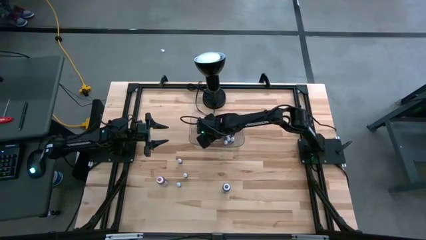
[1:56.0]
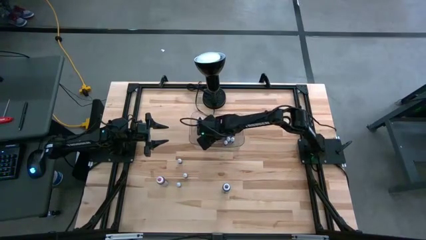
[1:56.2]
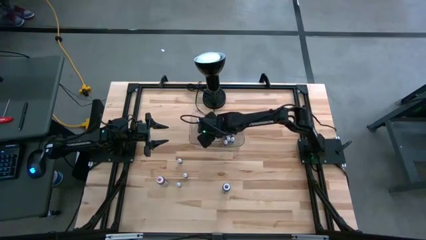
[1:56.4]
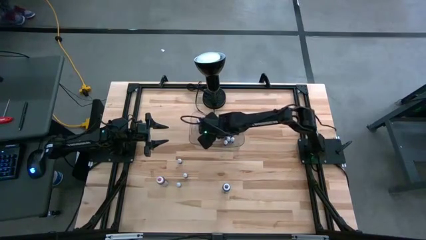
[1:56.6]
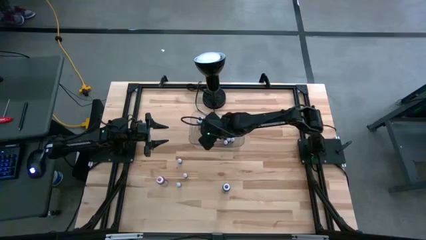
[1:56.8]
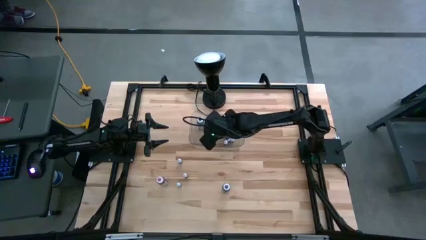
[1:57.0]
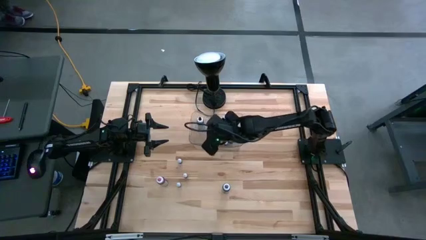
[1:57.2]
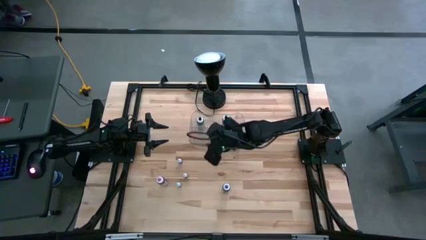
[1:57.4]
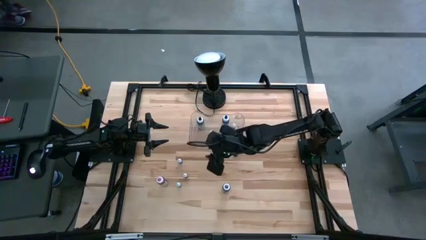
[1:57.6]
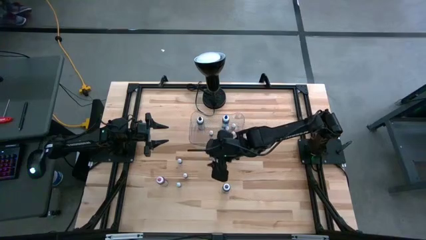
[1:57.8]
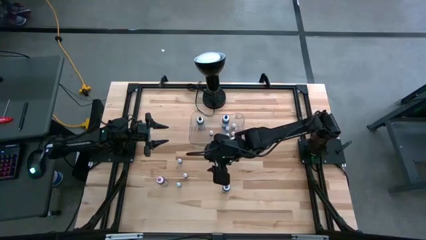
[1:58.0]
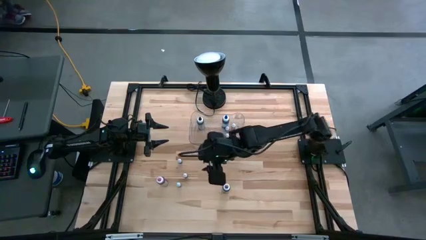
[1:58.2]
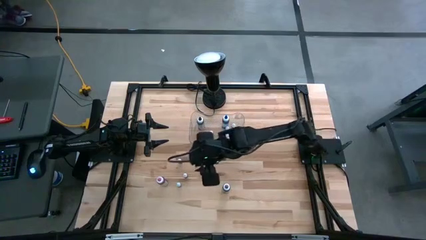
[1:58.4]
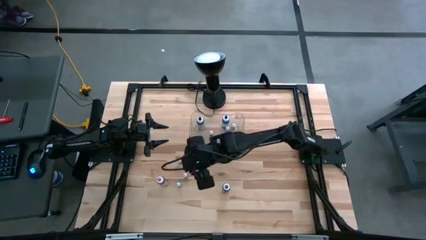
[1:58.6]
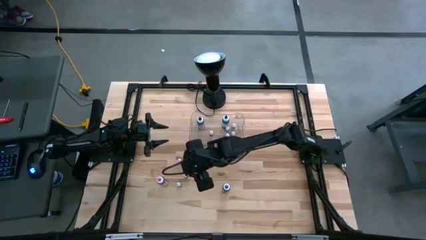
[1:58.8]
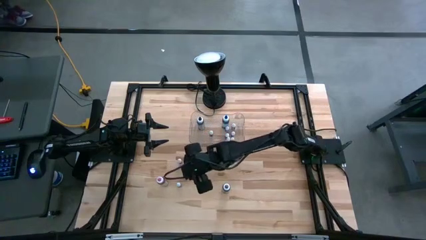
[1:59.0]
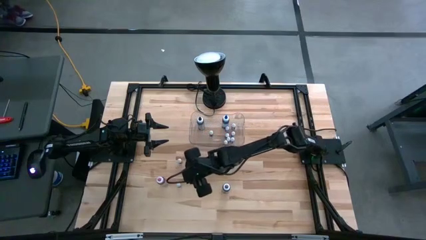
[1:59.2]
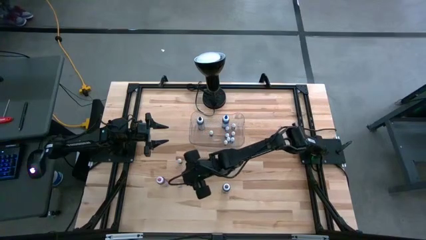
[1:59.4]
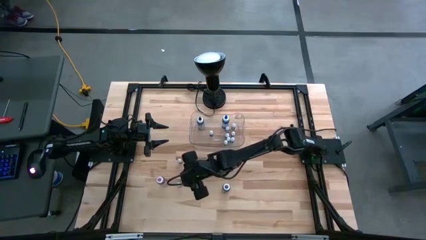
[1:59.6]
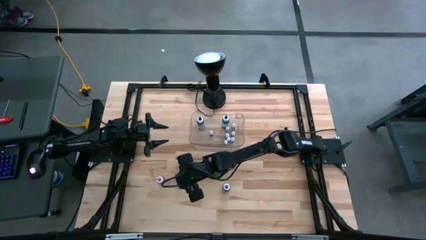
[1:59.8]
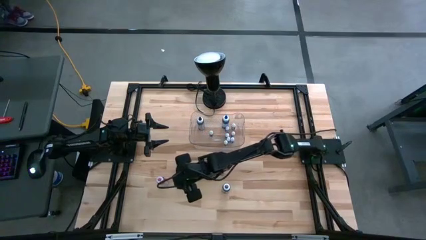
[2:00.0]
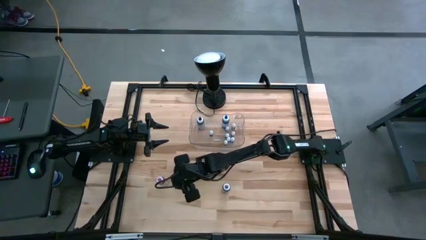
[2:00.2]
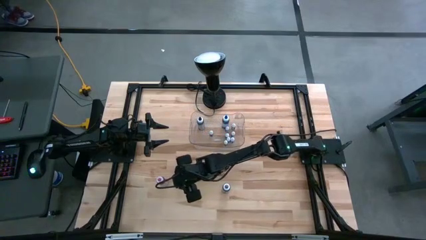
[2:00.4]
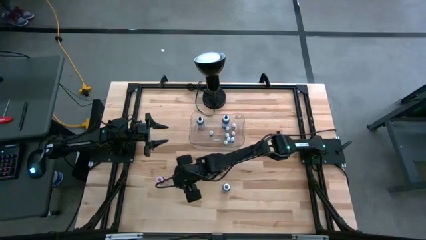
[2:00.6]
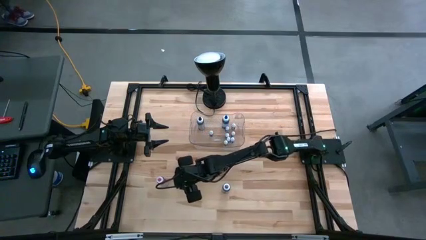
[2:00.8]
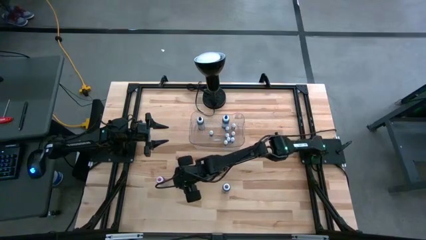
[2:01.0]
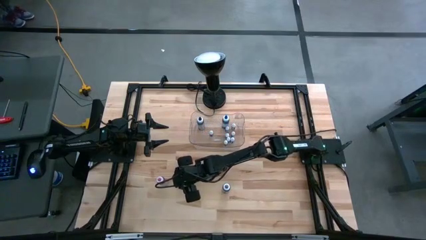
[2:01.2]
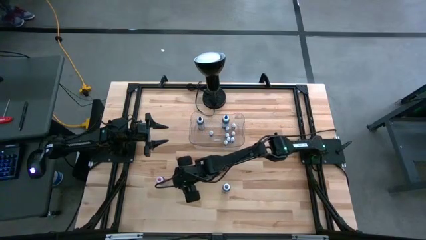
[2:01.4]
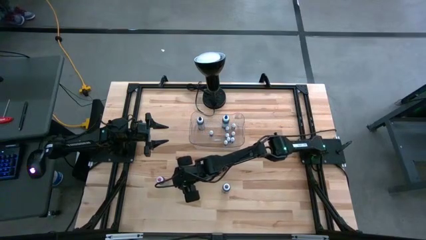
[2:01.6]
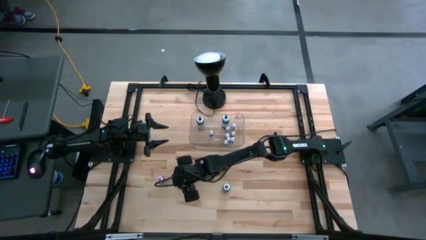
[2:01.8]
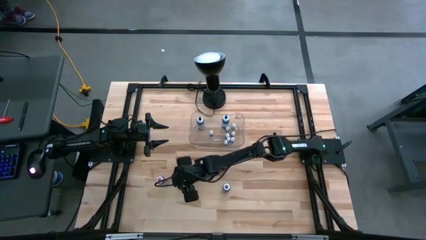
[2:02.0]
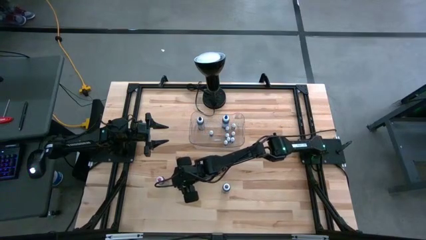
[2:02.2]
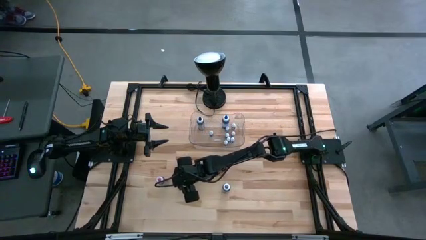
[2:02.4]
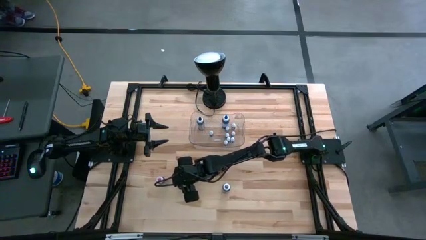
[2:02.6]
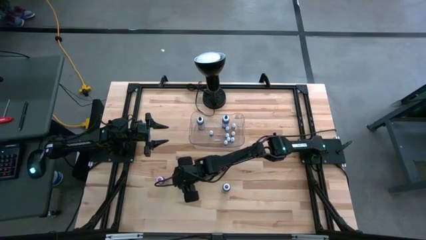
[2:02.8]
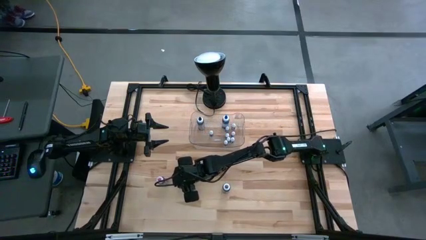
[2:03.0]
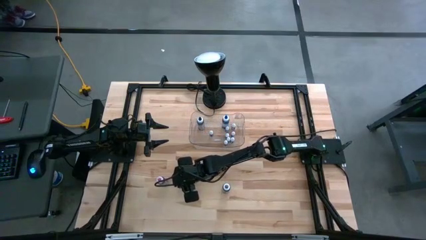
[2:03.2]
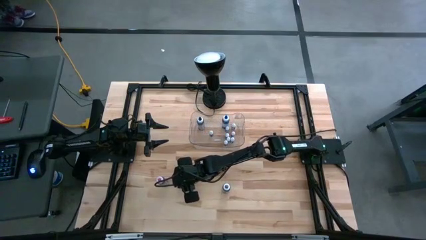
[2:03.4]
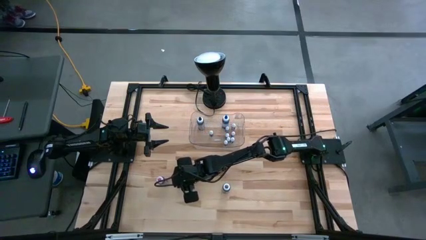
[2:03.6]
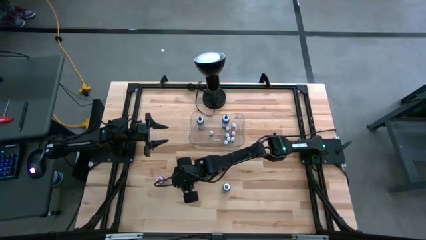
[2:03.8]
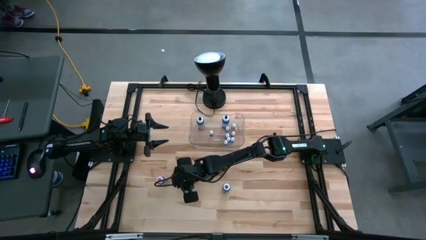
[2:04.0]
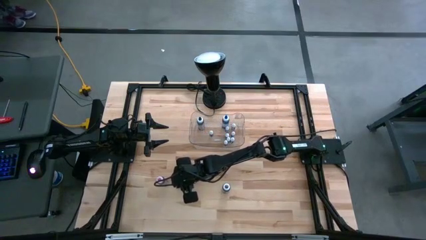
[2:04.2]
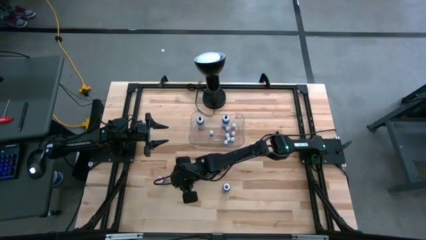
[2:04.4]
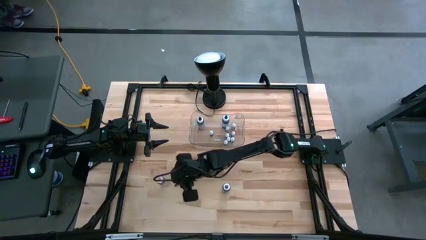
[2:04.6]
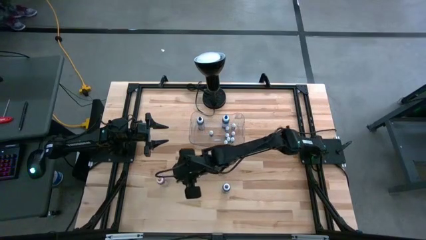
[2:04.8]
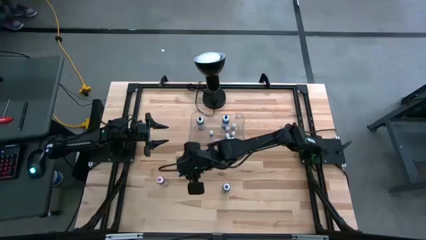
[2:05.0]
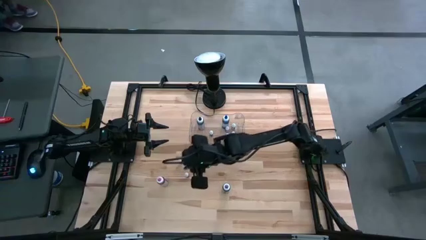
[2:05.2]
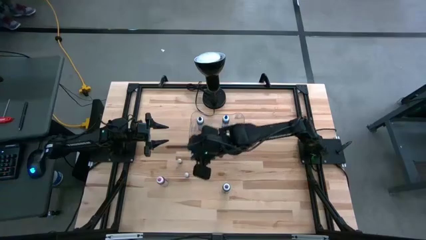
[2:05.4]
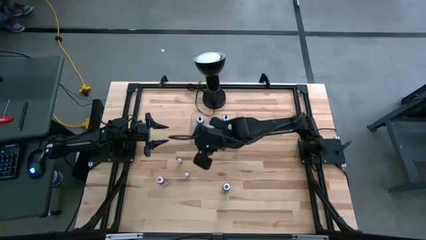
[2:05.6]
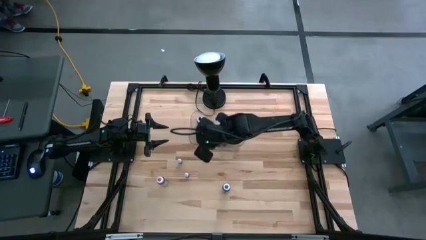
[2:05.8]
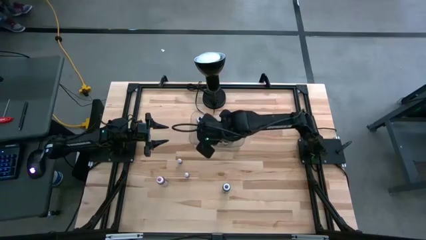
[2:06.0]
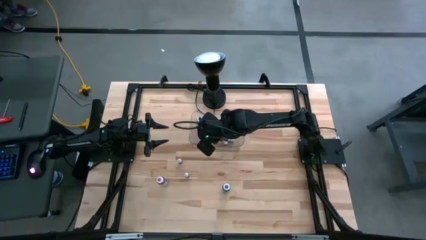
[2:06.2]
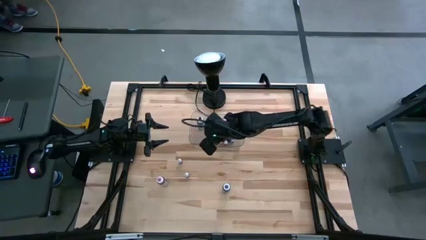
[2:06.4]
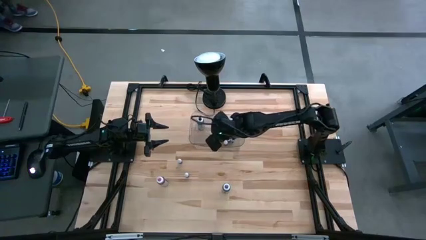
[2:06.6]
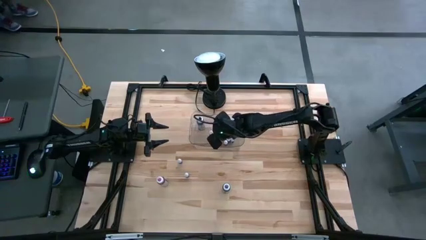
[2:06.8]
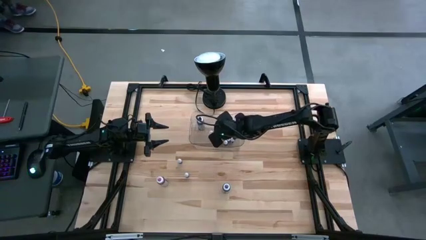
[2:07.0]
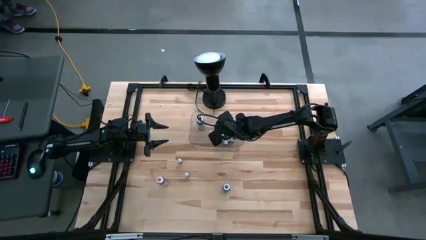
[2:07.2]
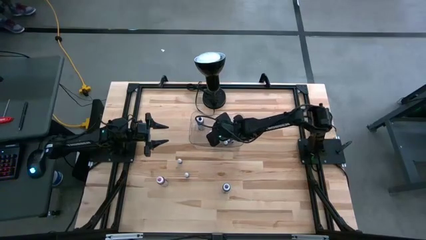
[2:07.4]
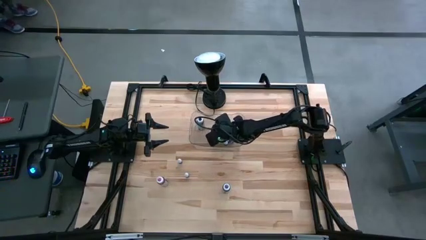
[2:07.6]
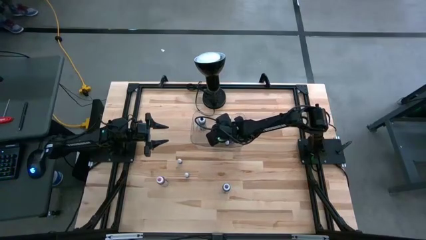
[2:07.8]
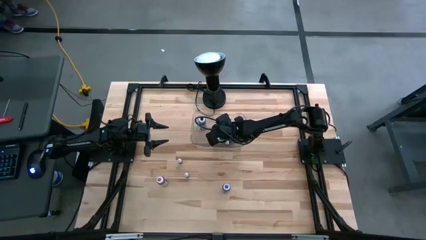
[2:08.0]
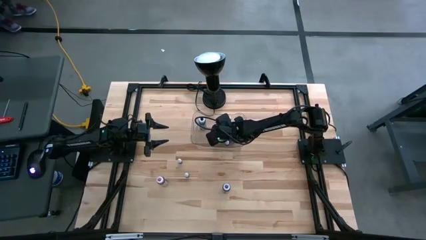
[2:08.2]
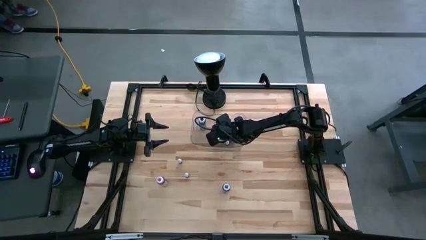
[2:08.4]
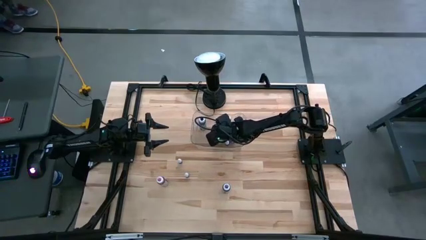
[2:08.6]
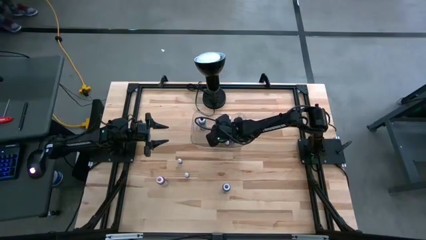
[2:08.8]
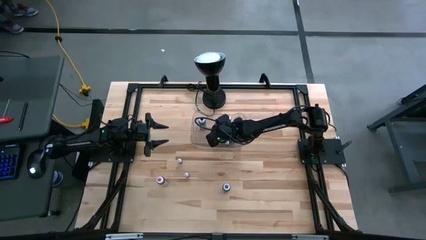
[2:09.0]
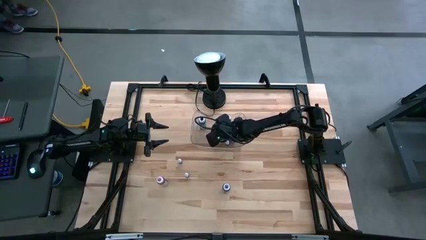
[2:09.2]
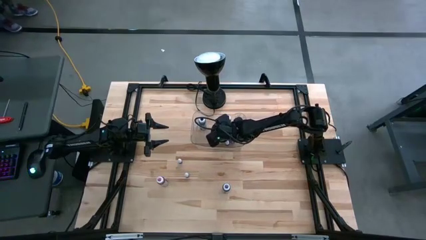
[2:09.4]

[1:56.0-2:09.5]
Task: Pick & Place food coloring
Put the small blue food coloring bottle into the transparent bin
